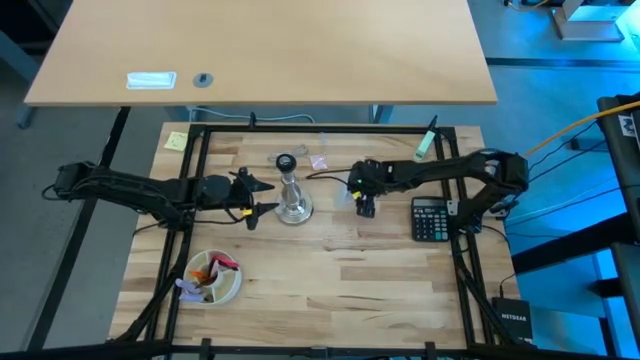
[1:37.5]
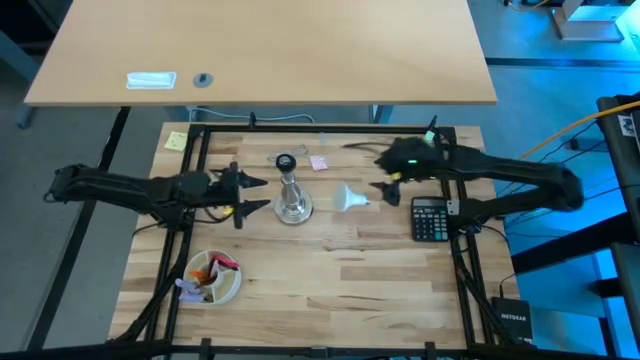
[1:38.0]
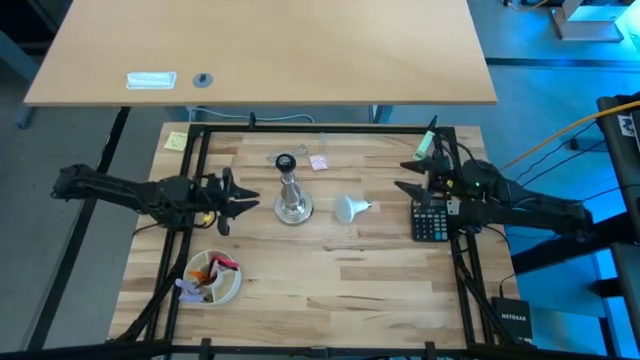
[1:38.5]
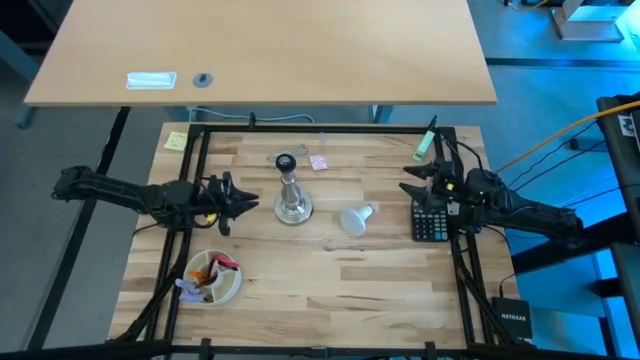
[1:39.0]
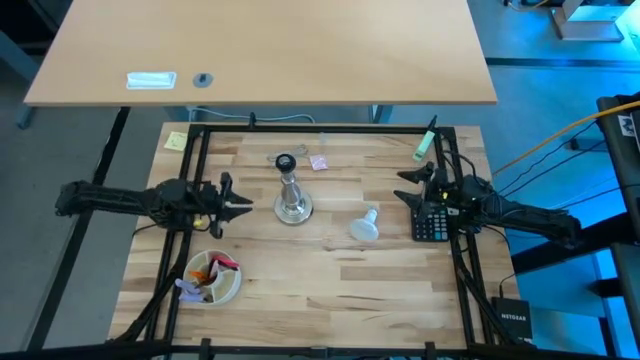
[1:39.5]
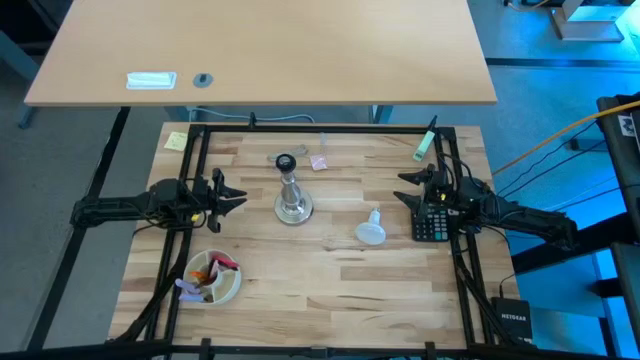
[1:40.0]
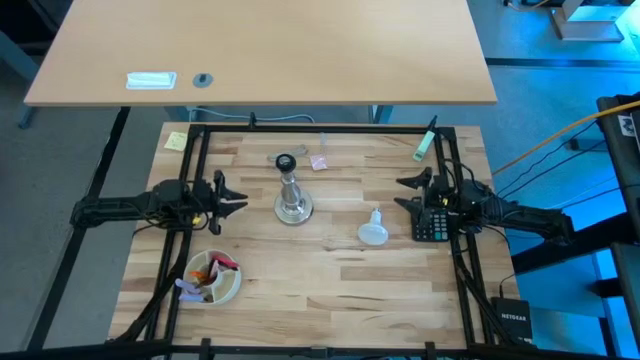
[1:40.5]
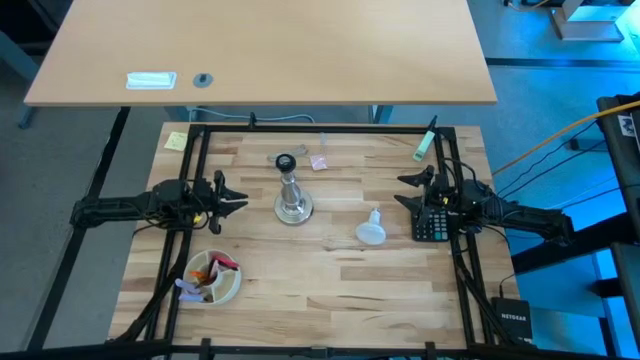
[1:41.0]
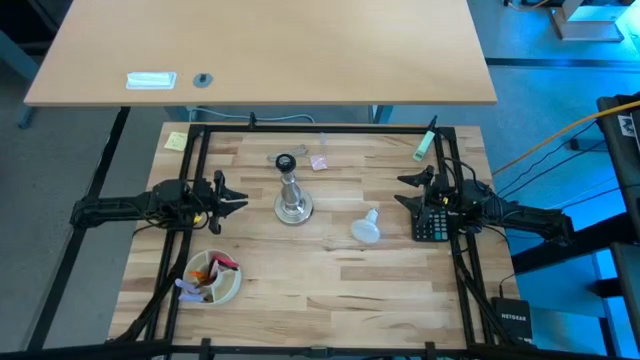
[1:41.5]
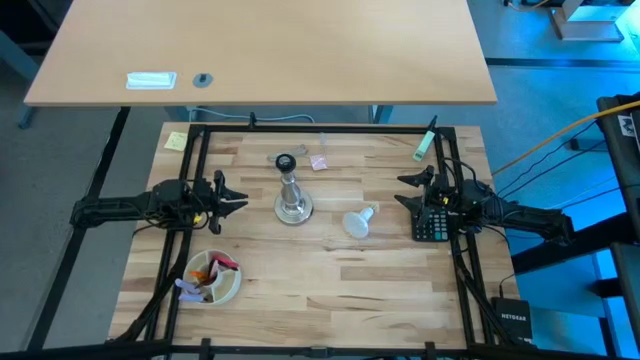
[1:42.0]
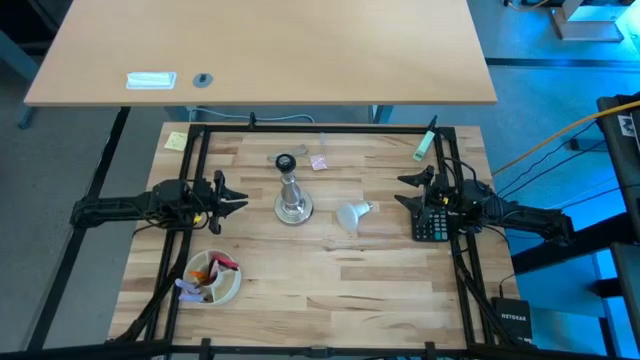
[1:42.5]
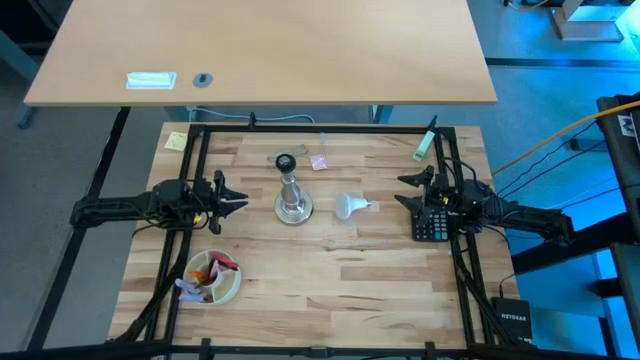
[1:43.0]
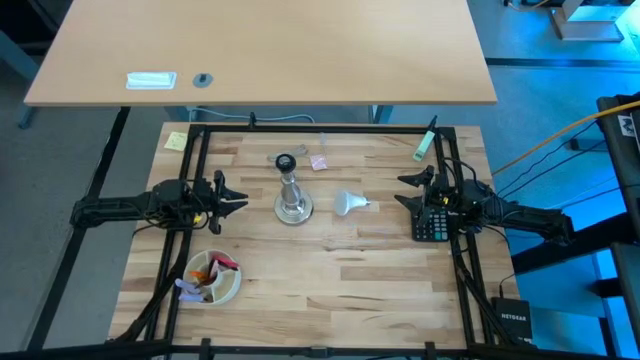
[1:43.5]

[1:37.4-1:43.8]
Task: Screw lightbulb
Return to Home Position

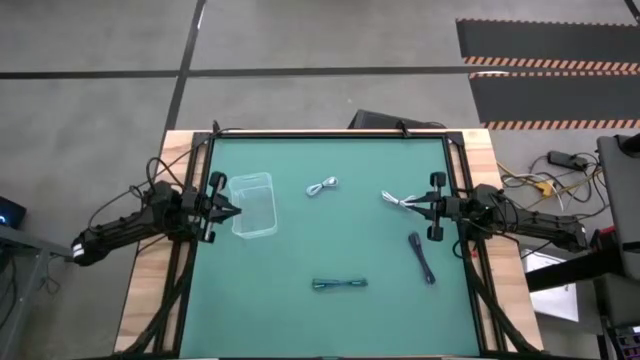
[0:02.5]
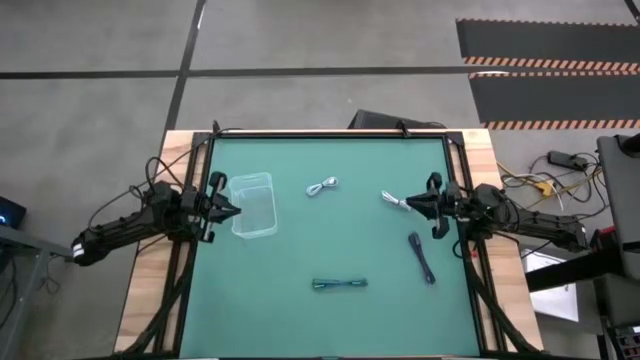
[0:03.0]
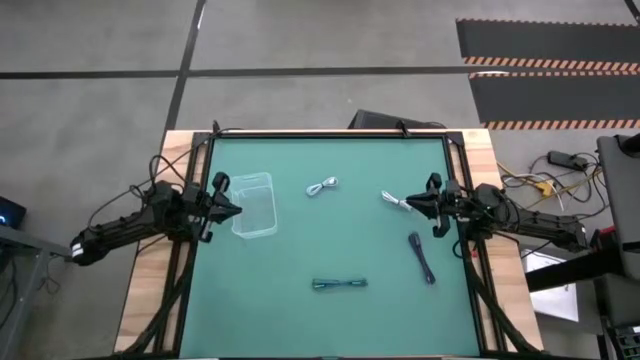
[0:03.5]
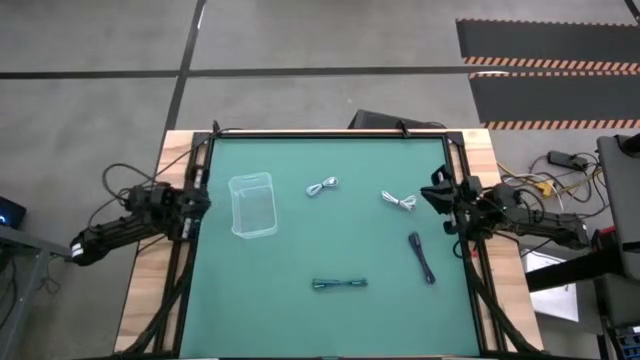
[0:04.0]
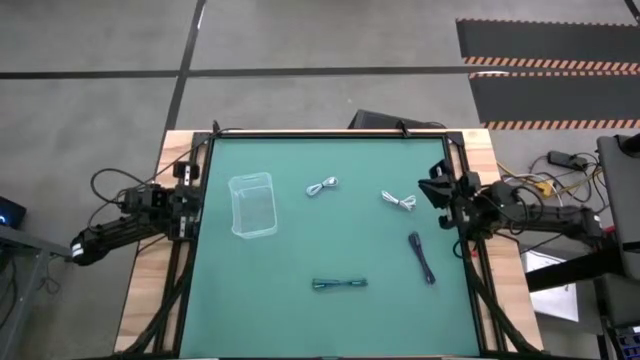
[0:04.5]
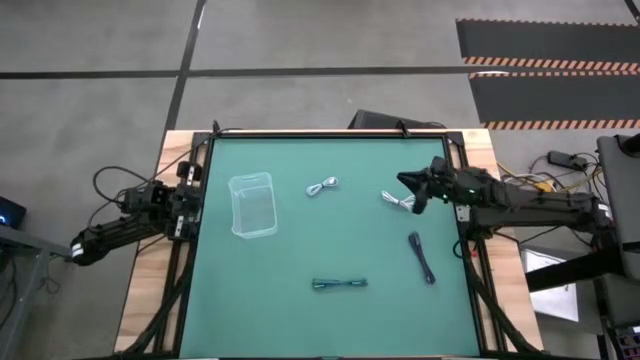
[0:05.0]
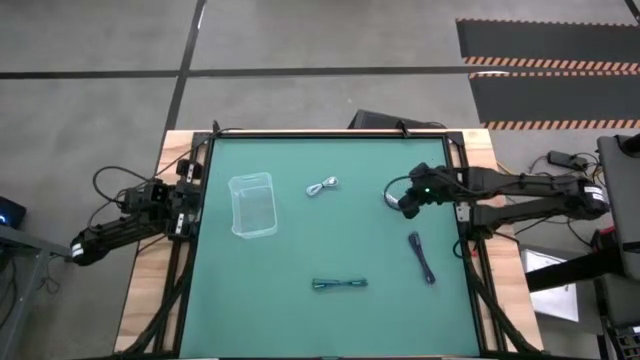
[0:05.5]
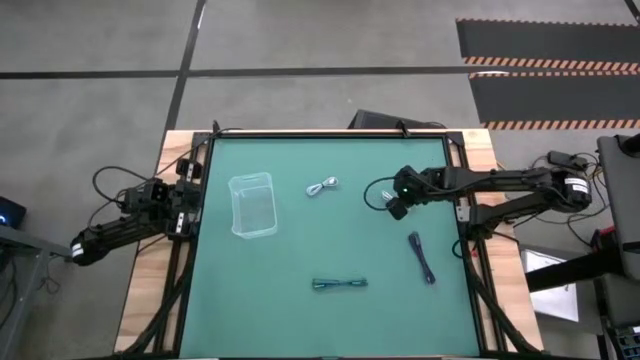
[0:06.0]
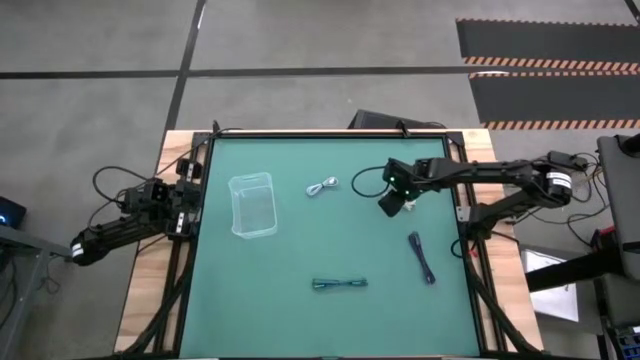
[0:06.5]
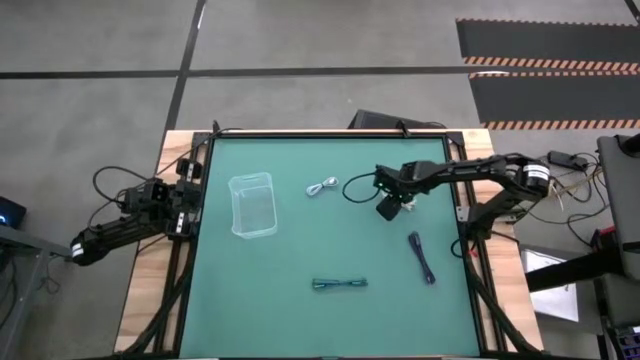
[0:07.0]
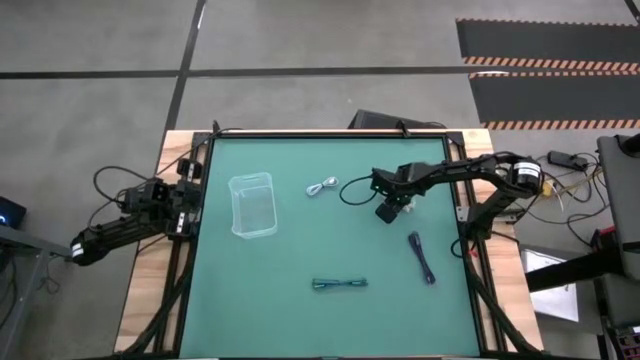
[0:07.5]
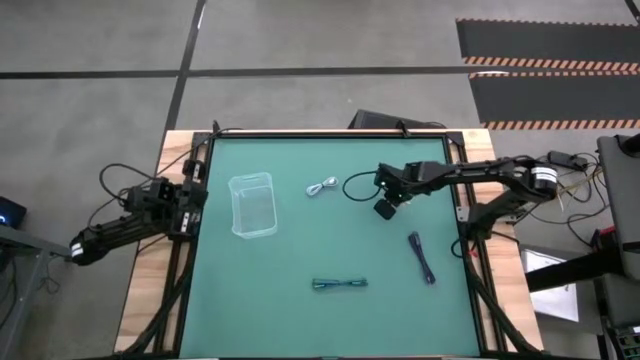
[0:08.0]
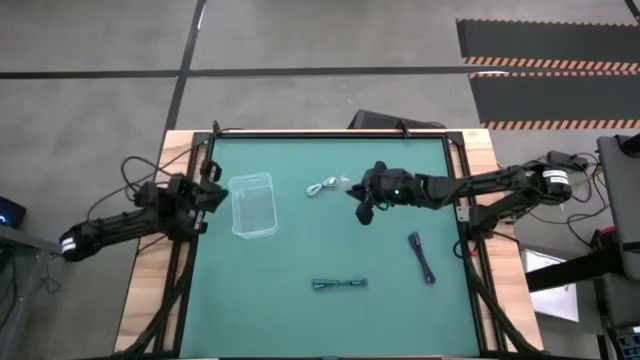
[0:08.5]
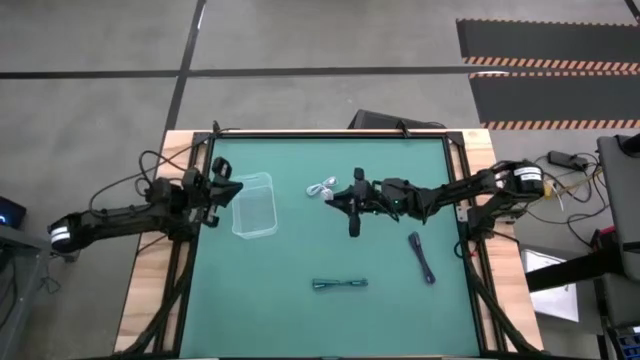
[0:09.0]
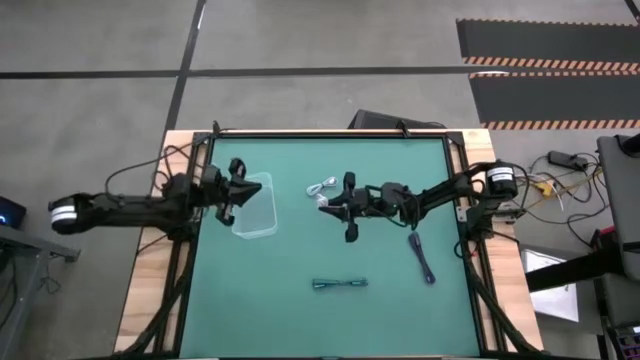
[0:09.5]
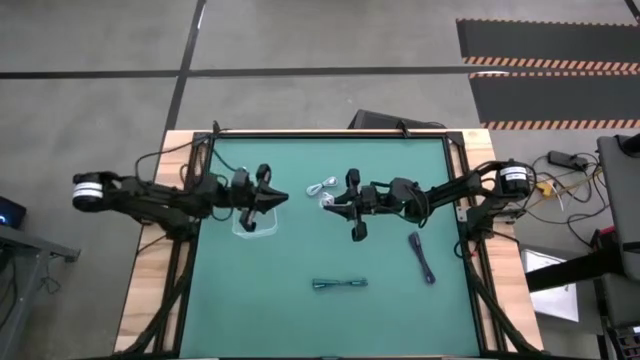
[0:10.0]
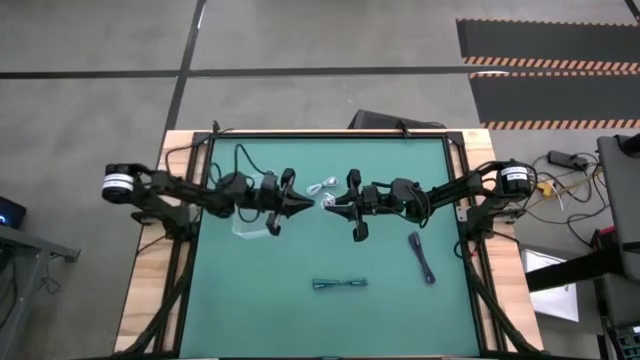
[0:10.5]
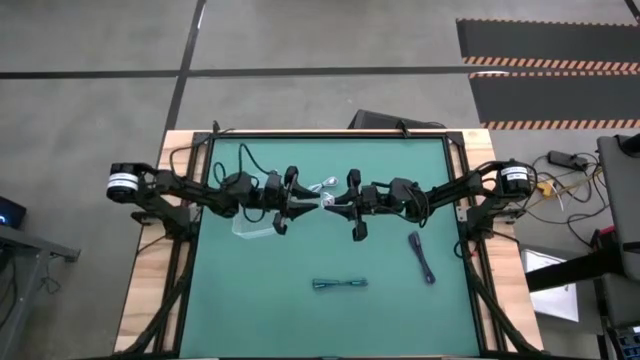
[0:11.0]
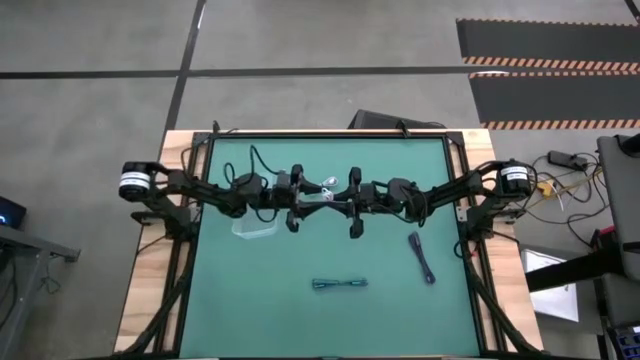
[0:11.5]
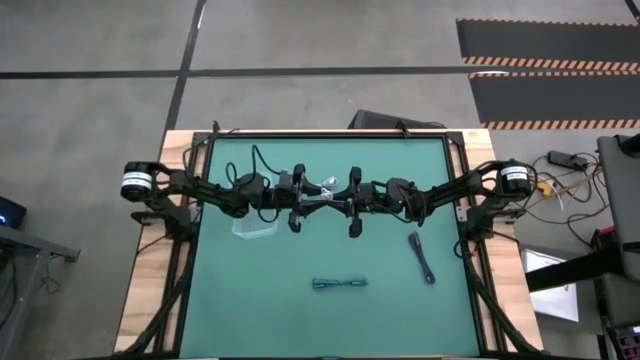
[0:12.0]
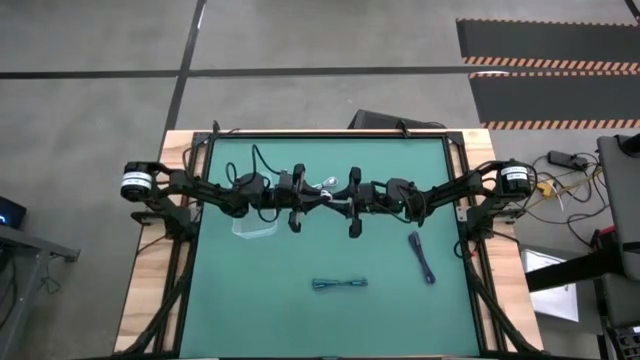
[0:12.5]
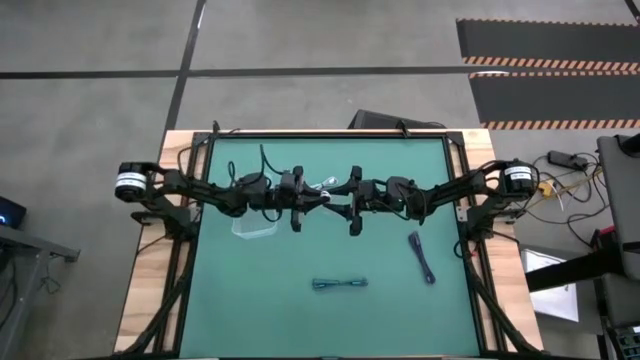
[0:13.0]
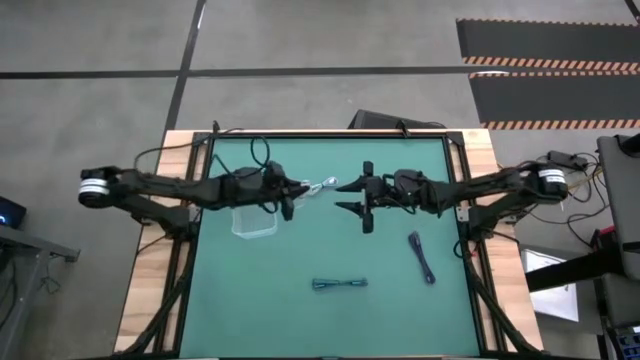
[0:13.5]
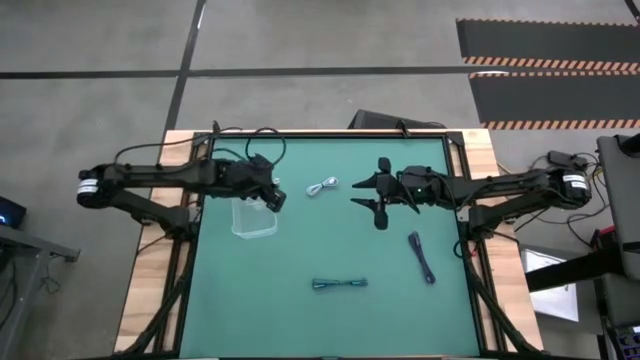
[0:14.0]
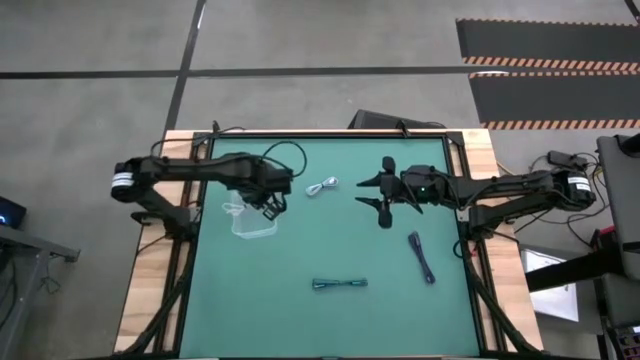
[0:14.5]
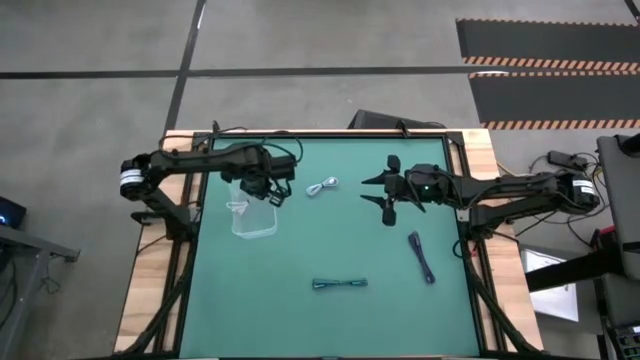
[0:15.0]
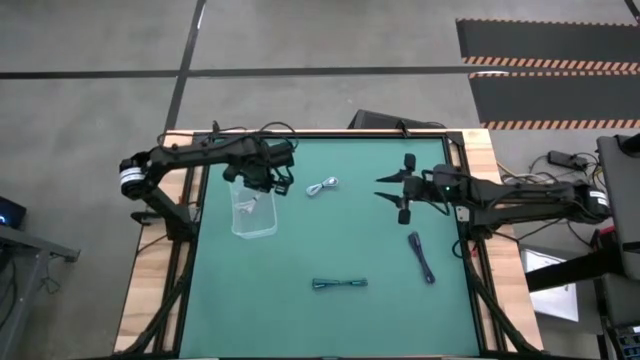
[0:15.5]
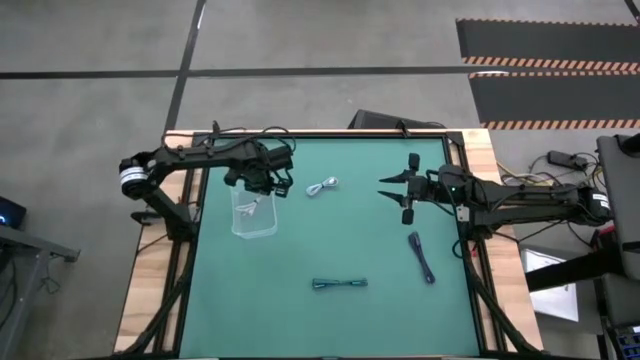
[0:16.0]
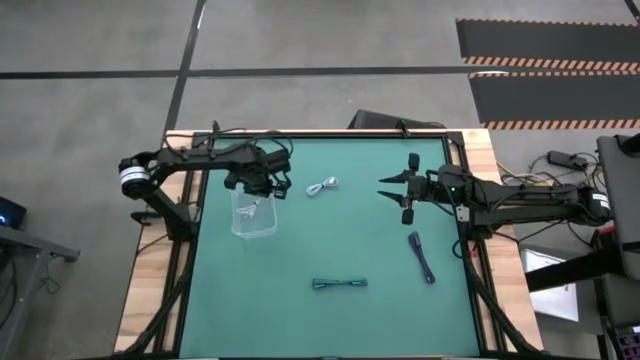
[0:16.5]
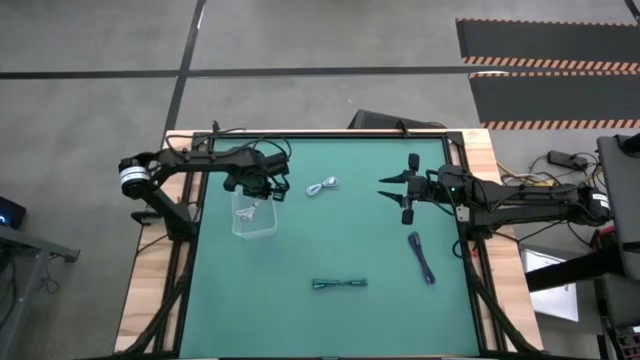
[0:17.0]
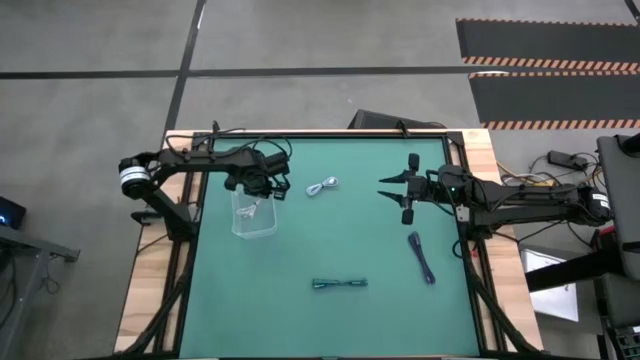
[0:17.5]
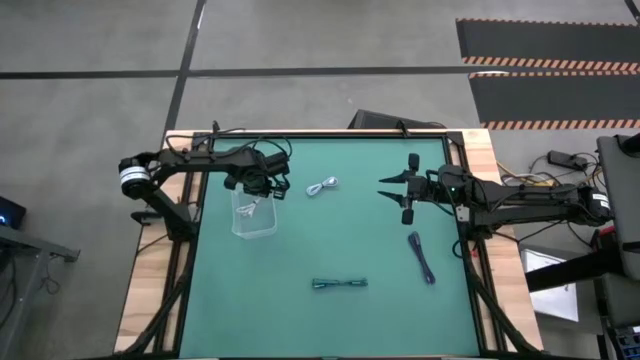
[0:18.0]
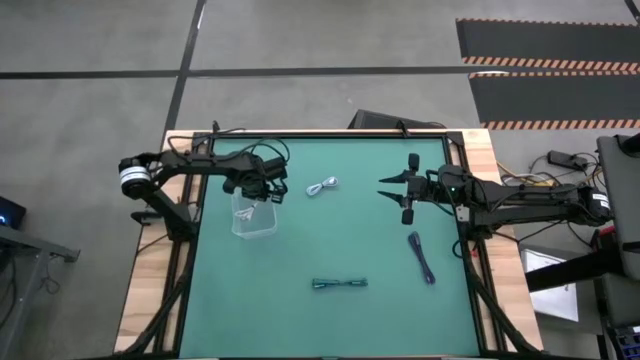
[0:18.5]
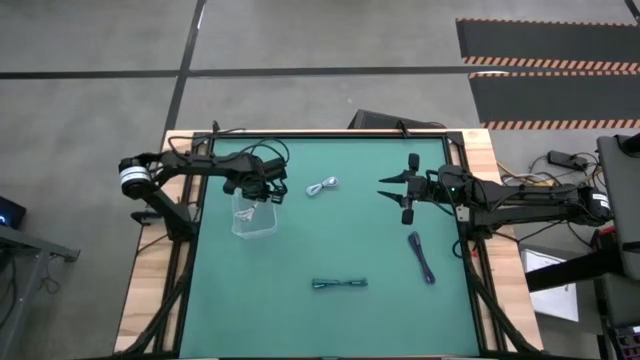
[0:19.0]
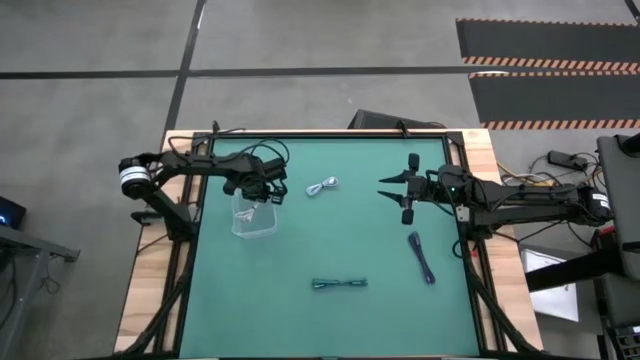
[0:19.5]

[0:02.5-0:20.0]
Task: Pick and place USB-C Cables
Put the white charger cable into the transparent bin
